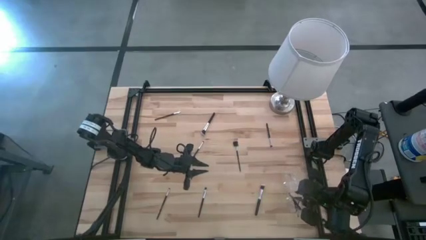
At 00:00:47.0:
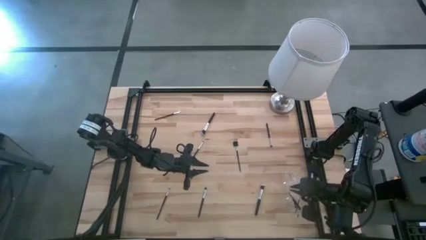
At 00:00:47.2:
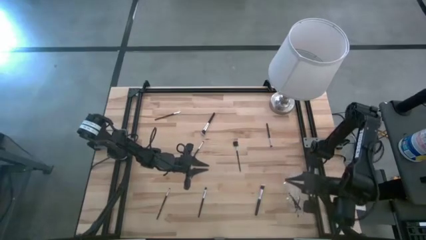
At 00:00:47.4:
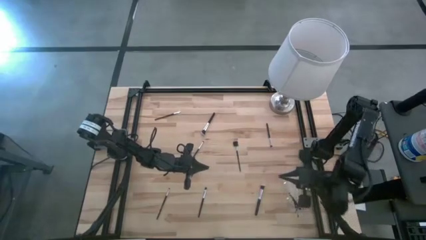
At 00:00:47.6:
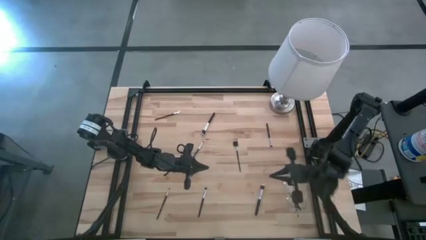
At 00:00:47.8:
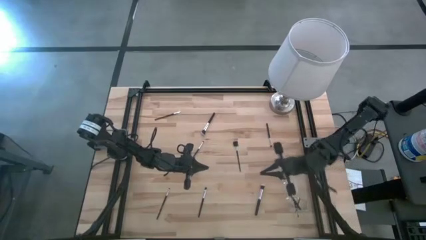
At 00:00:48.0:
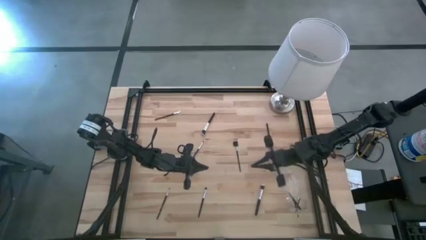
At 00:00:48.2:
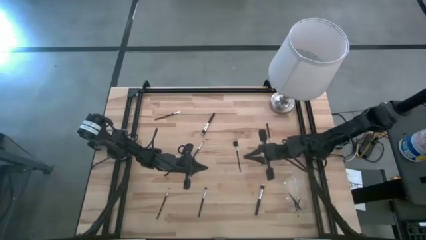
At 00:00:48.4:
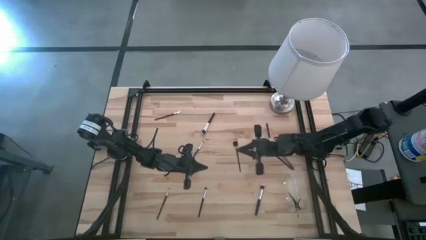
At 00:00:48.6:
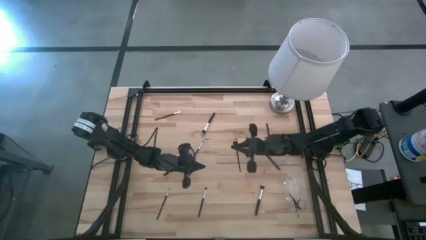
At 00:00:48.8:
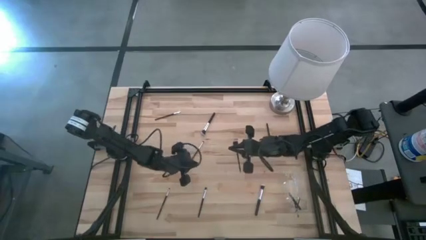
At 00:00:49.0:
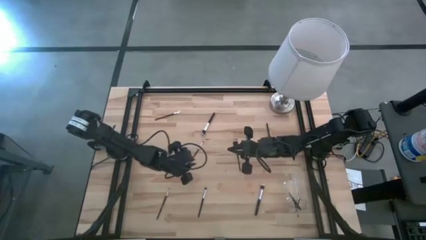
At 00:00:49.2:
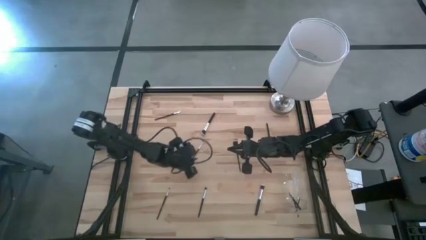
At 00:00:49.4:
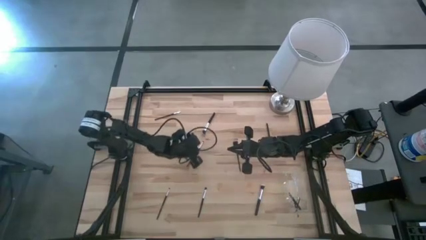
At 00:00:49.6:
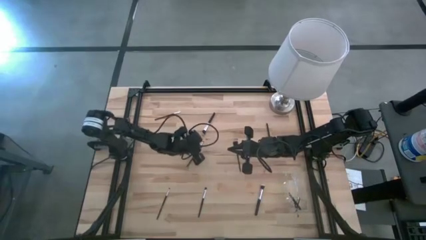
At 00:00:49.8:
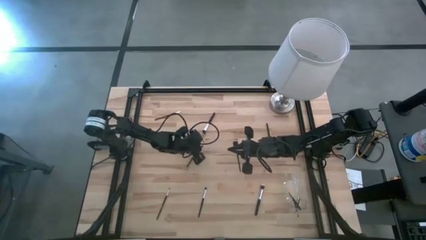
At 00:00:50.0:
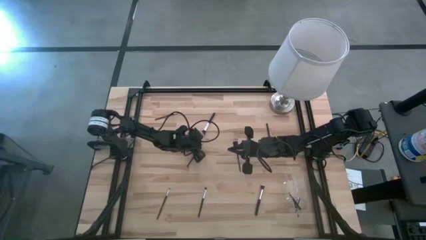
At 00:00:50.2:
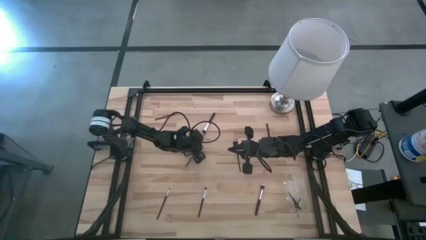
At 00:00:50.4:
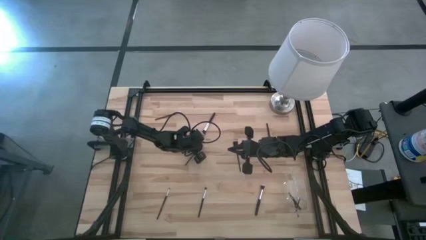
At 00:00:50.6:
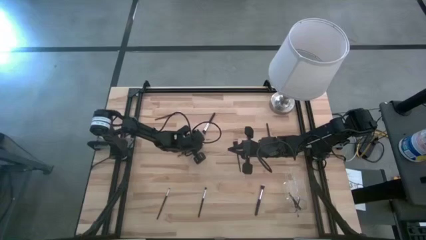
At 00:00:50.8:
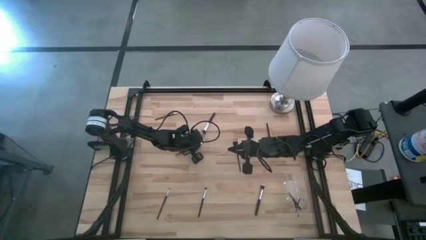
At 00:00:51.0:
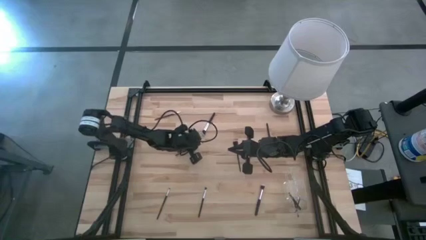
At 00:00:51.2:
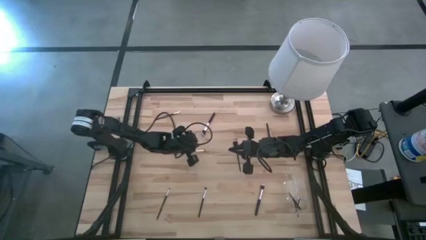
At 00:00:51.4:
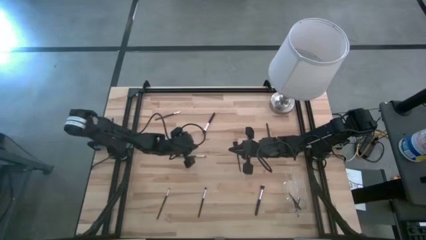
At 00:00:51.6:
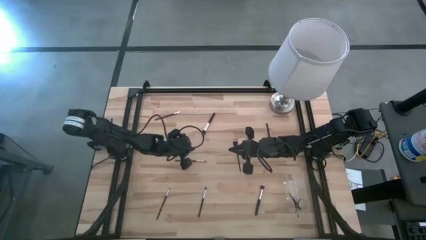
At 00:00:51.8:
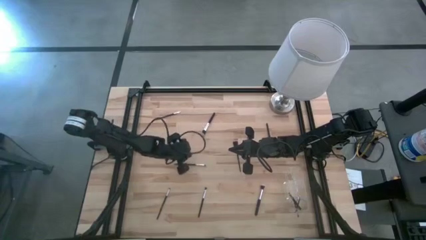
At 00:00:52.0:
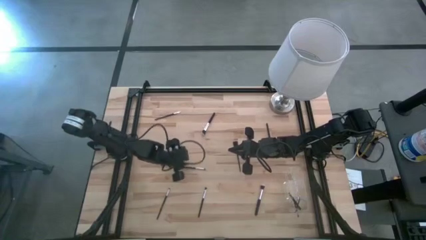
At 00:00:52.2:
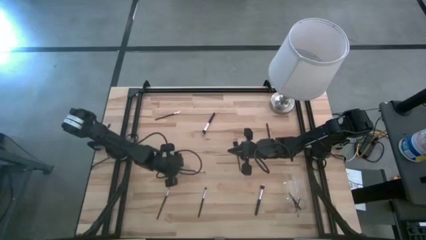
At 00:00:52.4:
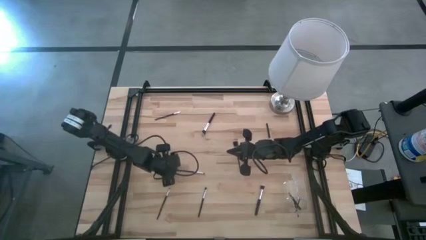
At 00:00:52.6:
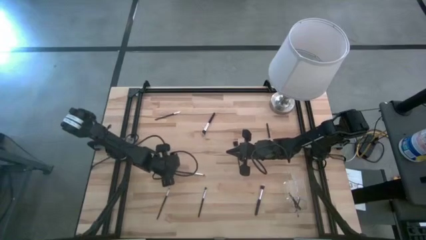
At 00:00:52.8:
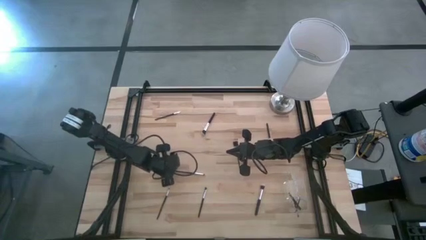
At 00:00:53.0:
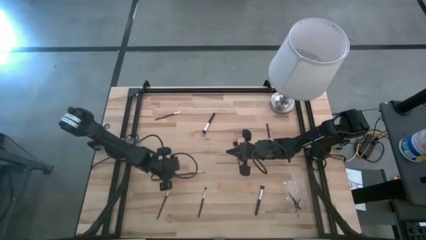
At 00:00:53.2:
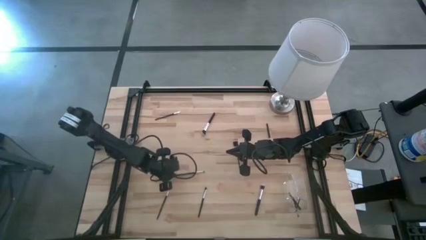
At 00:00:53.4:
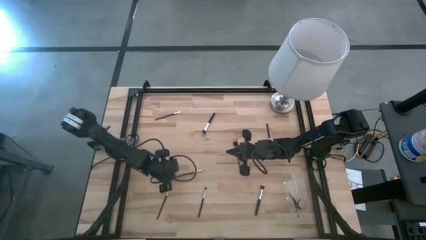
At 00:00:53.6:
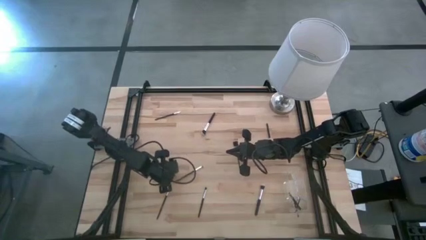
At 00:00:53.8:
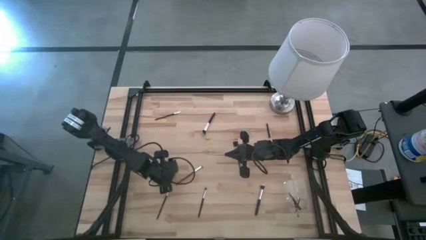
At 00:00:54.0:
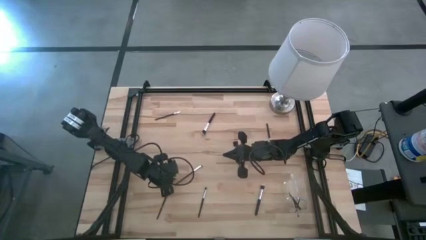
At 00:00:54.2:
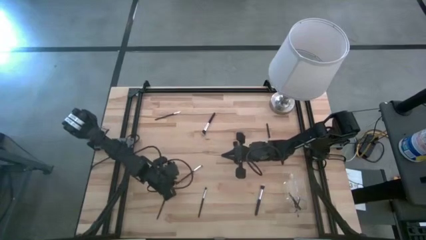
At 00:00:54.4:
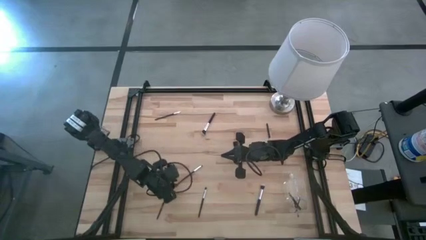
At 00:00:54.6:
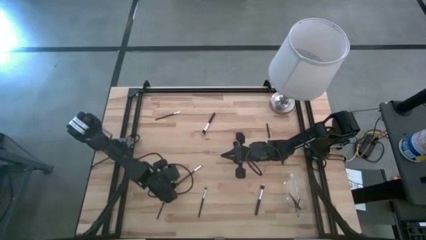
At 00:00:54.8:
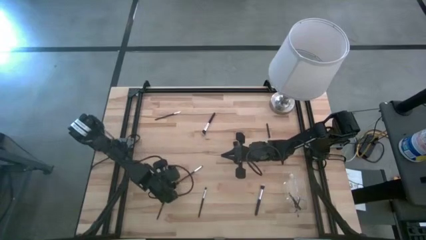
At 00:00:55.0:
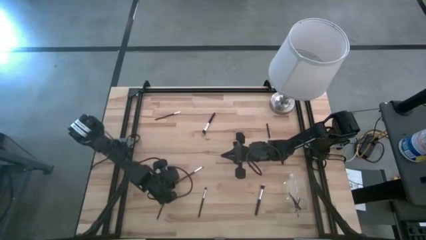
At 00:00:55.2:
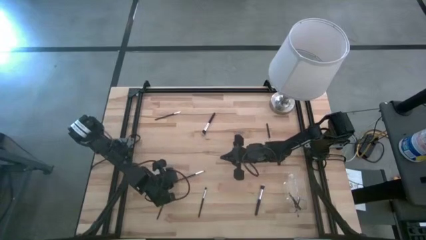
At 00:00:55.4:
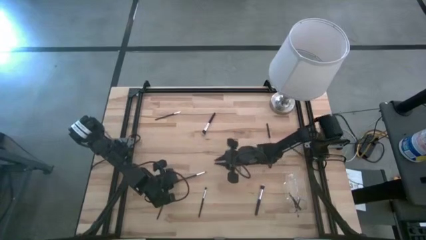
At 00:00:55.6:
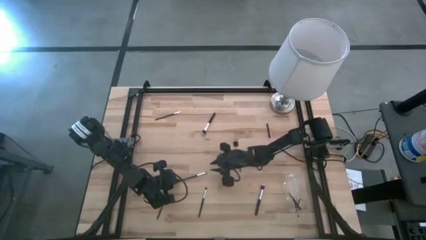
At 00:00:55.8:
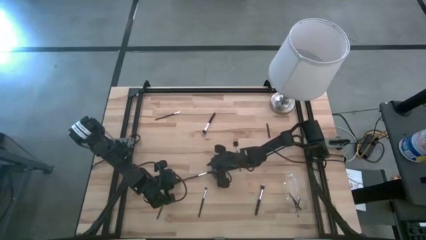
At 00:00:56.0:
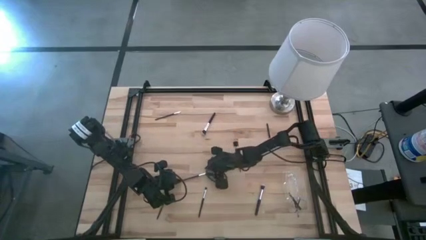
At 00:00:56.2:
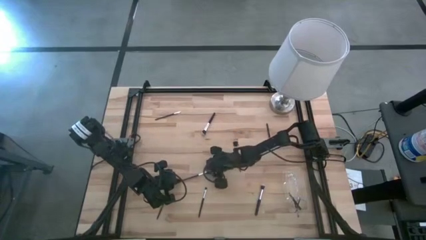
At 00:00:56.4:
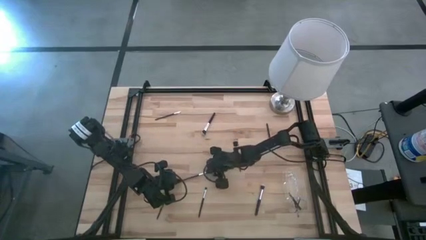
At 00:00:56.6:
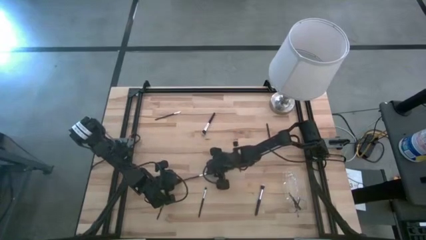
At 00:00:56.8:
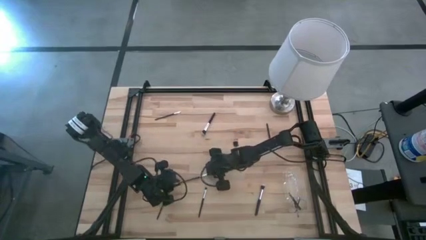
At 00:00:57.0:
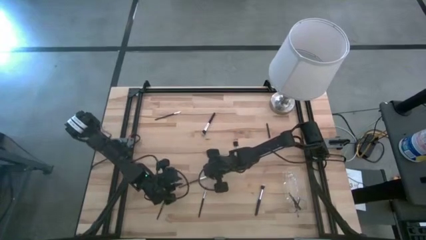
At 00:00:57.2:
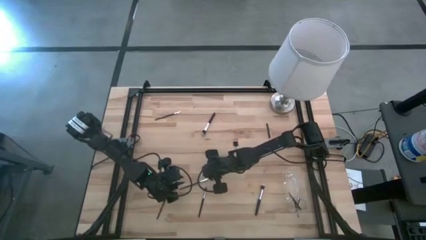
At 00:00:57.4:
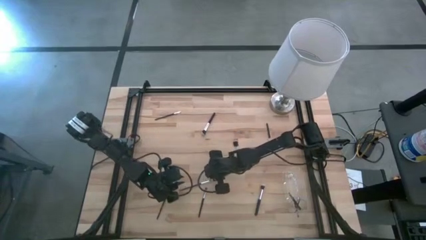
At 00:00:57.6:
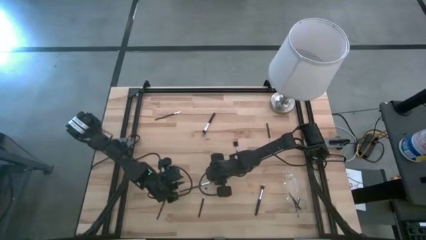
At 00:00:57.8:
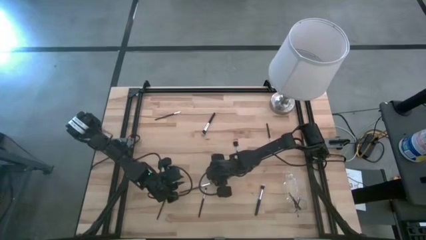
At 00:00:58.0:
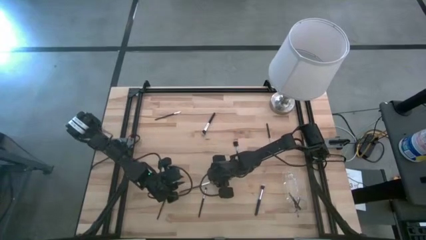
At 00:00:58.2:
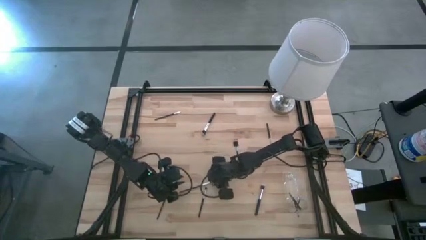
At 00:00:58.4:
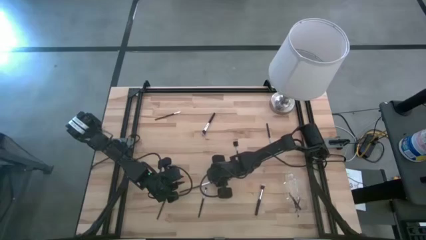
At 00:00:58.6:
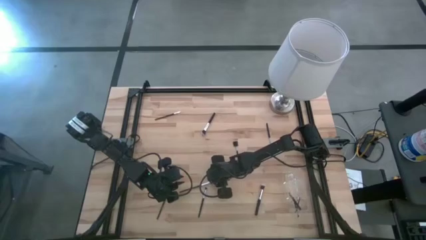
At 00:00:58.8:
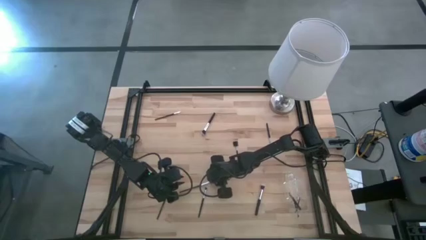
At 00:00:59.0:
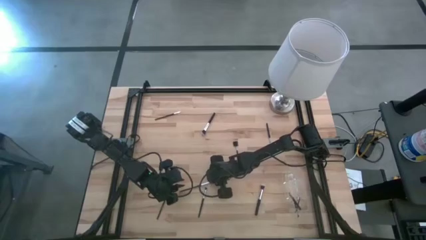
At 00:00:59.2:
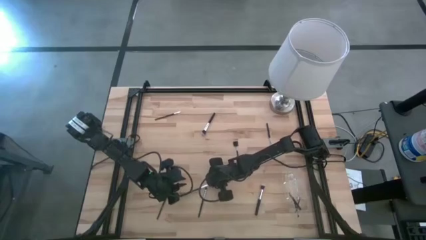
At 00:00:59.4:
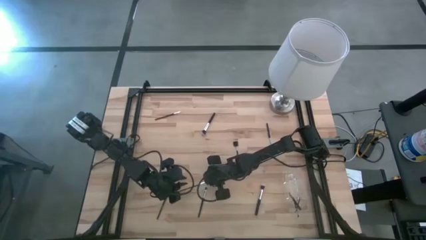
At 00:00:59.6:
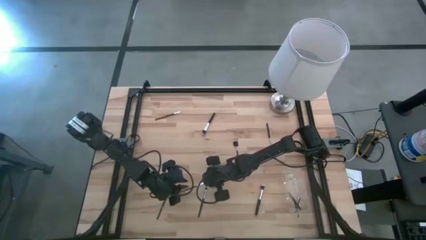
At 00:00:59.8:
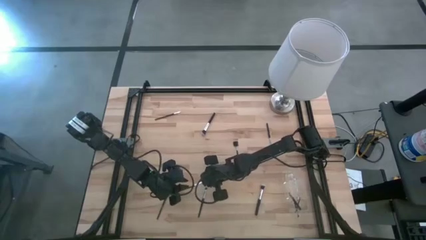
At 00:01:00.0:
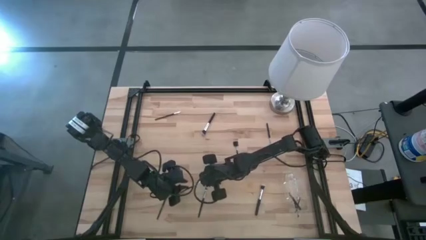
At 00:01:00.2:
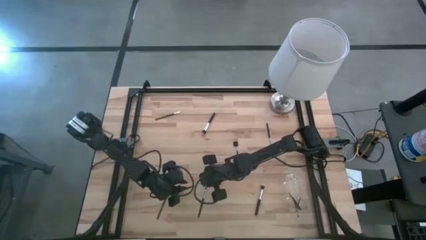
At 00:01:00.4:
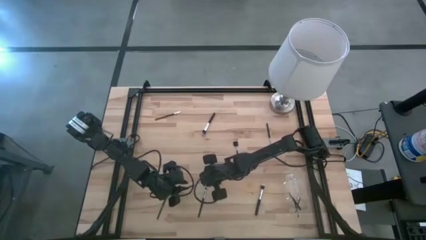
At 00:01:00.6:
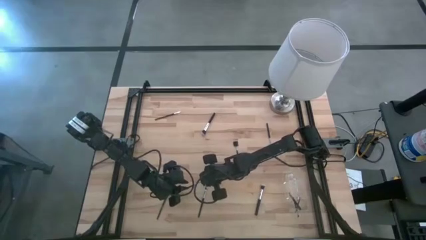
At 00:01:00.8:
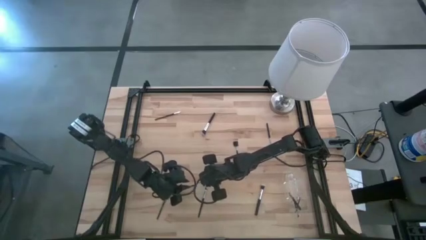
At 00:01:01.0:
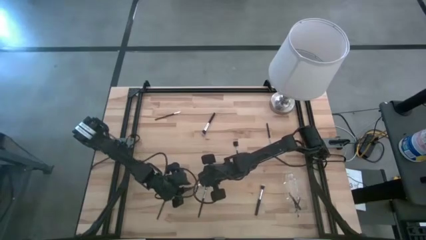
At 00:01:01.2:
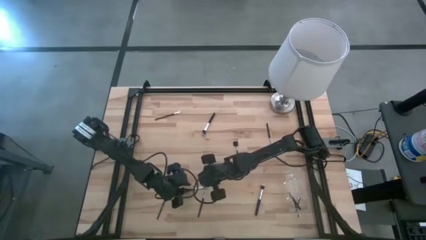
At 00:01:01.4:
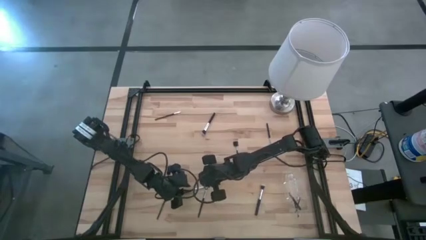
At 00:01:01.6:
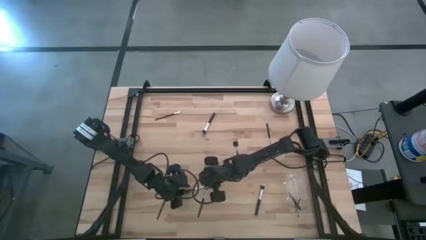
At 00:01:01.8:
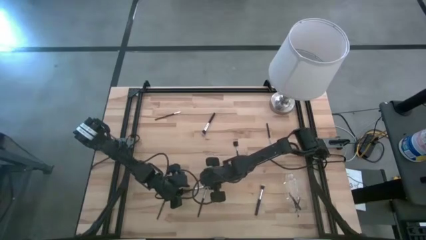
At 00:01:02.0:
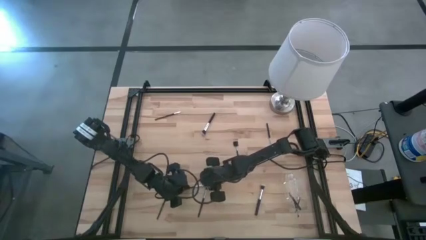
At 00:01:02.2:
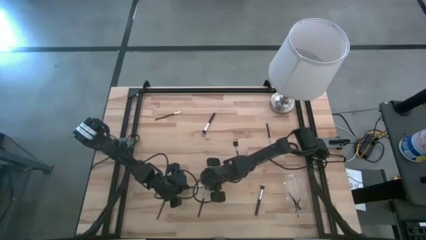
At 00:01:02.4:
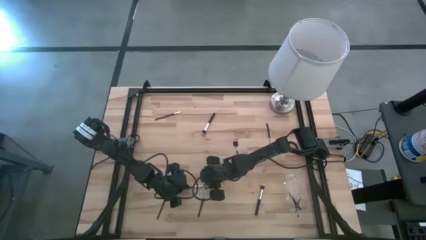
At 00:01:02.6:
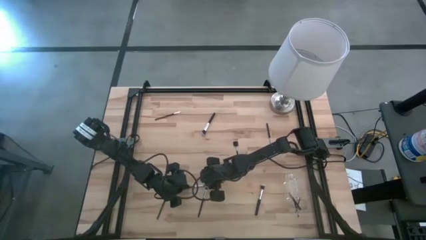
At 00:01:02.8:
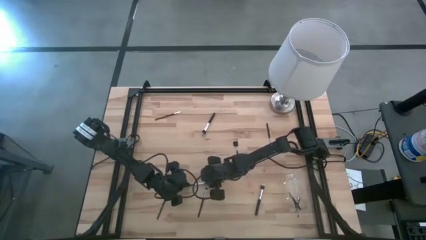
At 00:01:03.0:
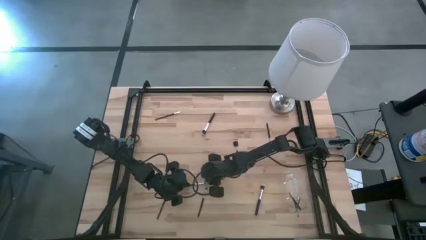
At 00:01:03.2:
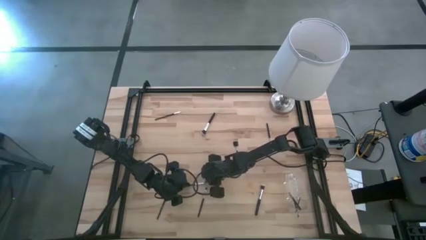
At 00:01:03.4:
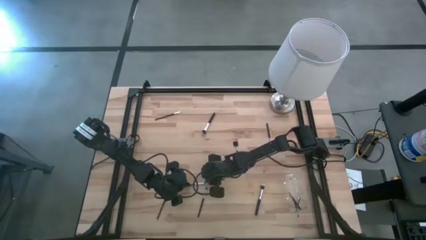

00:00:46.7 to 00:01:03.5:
Task: Put items in baskets/containers
Put the eyeshadow brush into the transparent organizer
